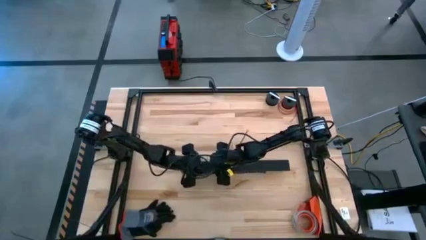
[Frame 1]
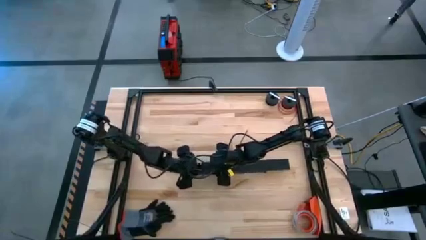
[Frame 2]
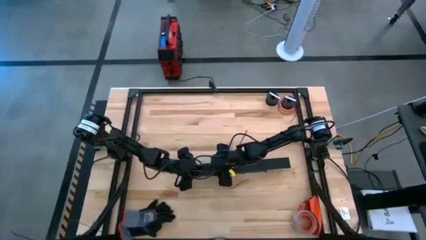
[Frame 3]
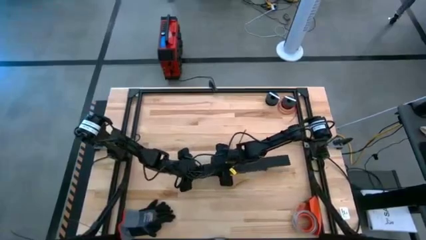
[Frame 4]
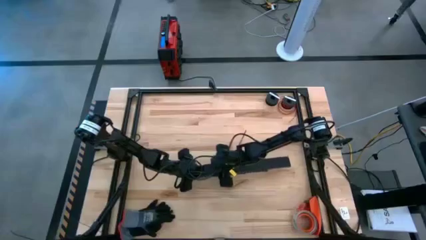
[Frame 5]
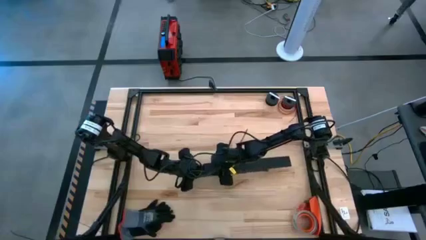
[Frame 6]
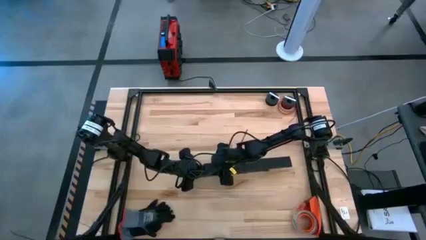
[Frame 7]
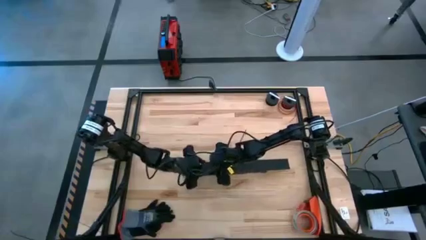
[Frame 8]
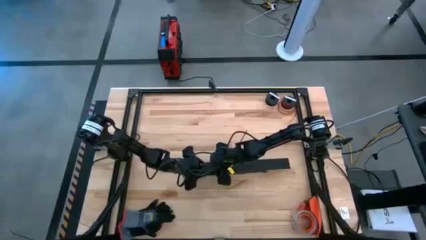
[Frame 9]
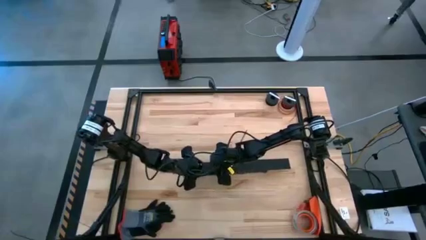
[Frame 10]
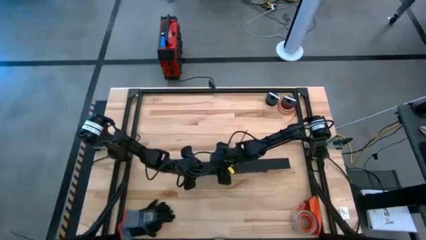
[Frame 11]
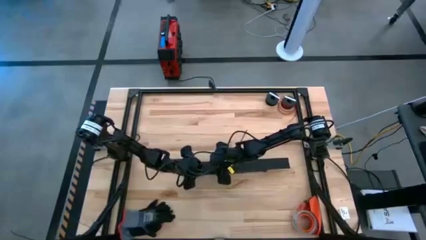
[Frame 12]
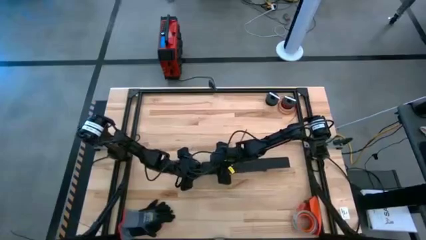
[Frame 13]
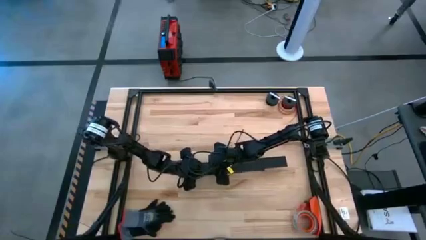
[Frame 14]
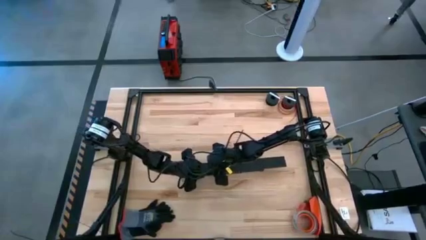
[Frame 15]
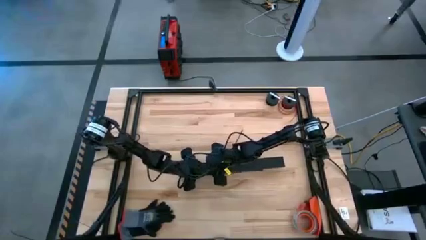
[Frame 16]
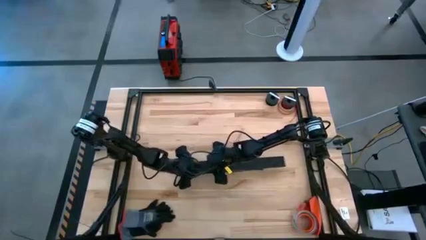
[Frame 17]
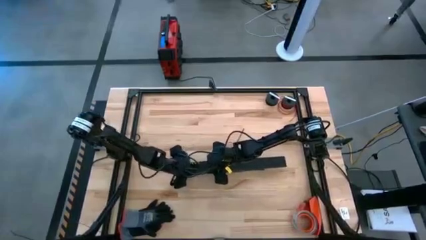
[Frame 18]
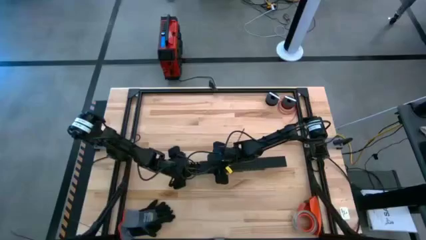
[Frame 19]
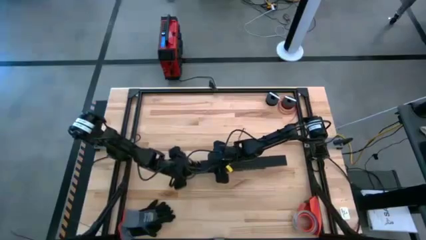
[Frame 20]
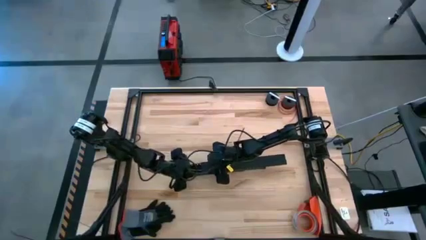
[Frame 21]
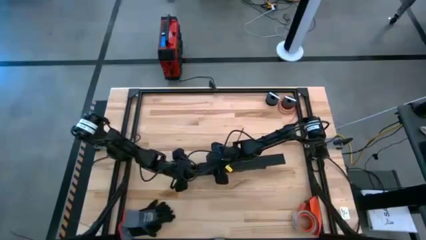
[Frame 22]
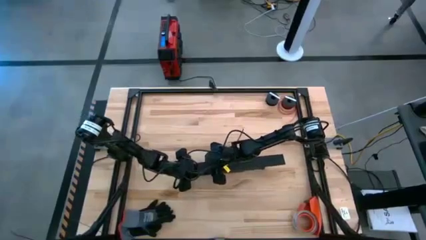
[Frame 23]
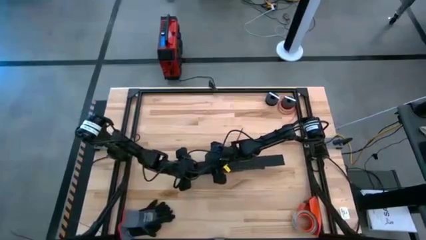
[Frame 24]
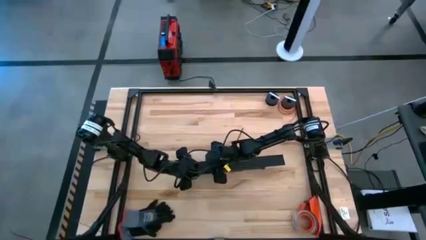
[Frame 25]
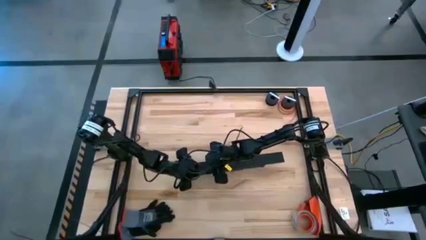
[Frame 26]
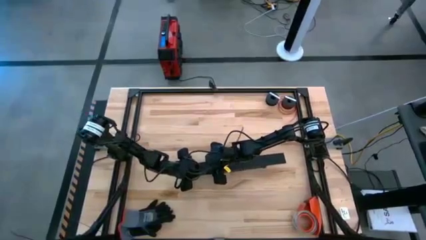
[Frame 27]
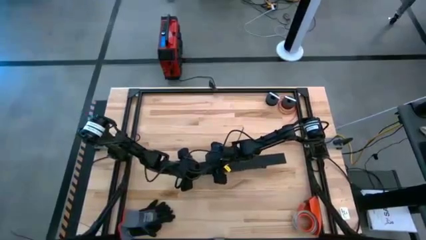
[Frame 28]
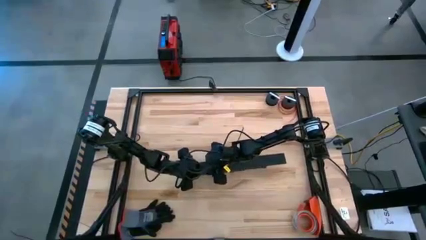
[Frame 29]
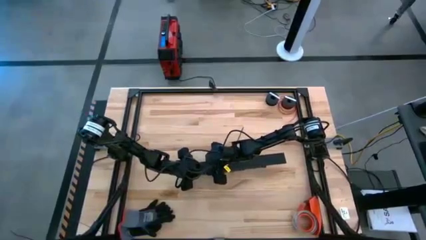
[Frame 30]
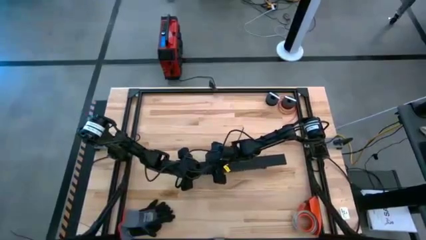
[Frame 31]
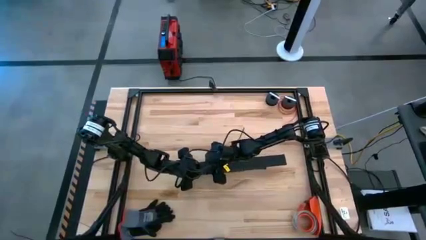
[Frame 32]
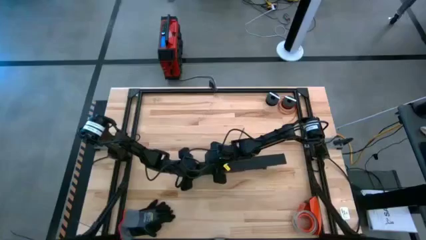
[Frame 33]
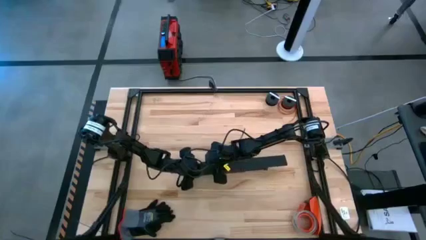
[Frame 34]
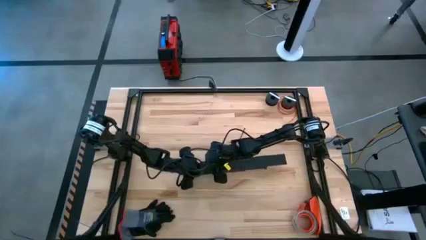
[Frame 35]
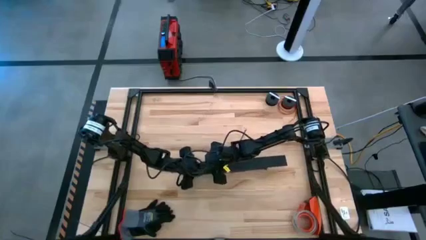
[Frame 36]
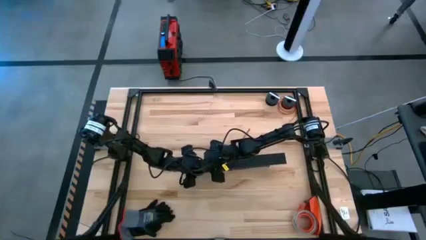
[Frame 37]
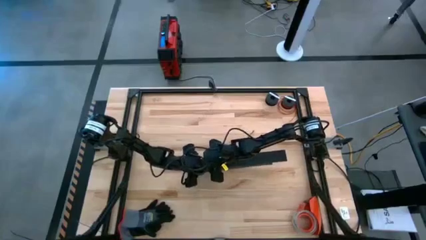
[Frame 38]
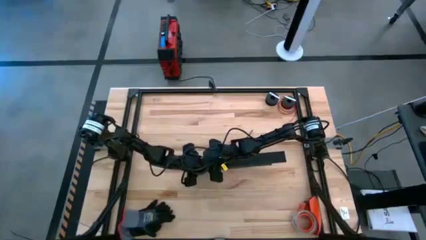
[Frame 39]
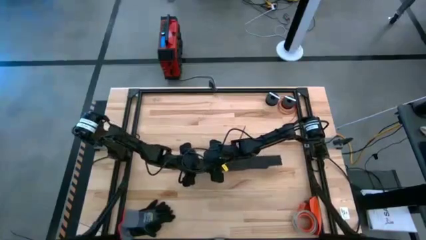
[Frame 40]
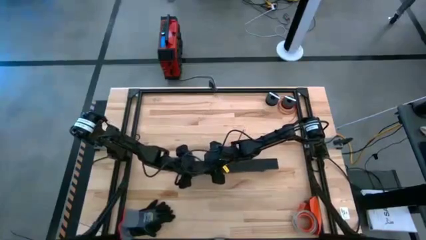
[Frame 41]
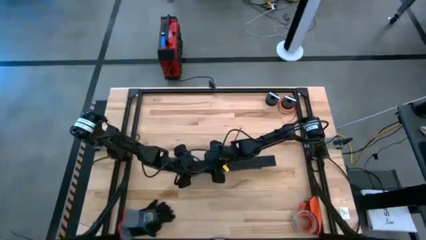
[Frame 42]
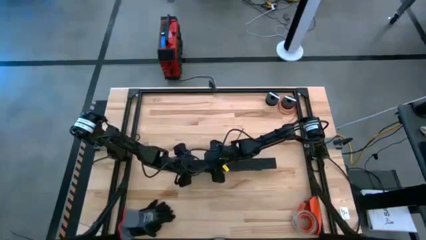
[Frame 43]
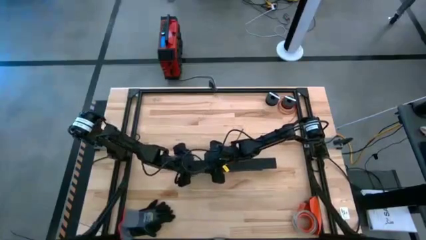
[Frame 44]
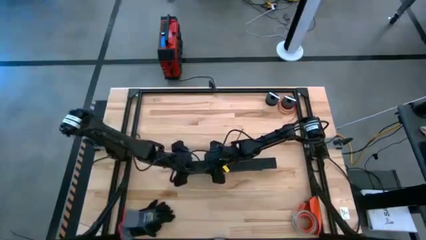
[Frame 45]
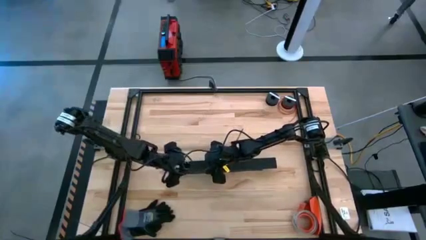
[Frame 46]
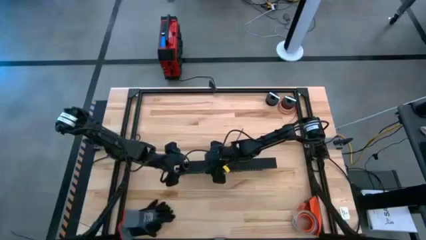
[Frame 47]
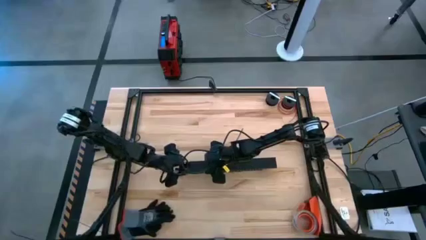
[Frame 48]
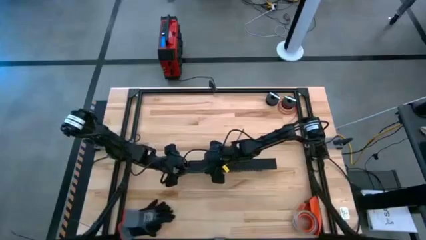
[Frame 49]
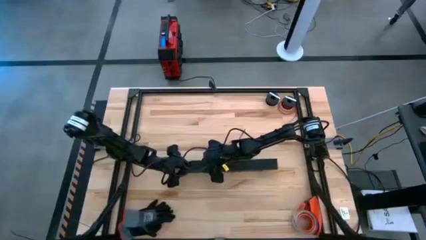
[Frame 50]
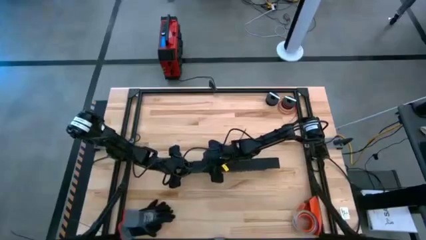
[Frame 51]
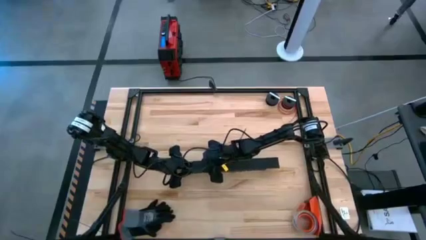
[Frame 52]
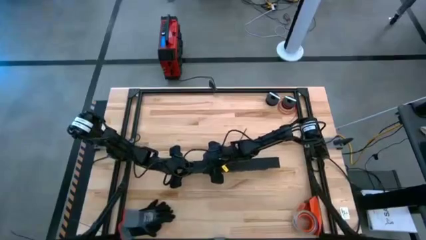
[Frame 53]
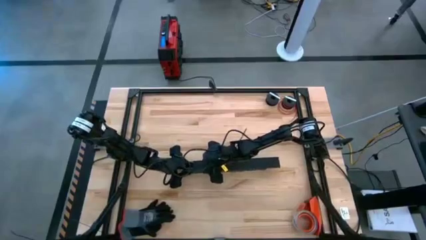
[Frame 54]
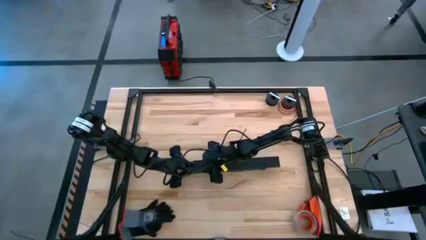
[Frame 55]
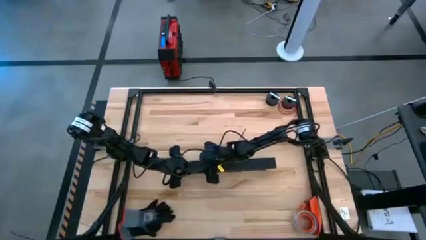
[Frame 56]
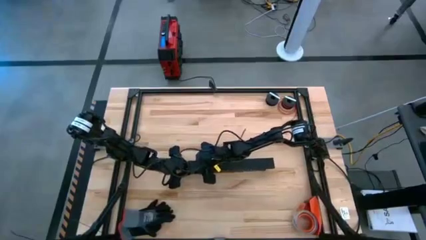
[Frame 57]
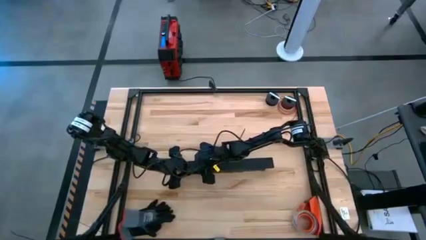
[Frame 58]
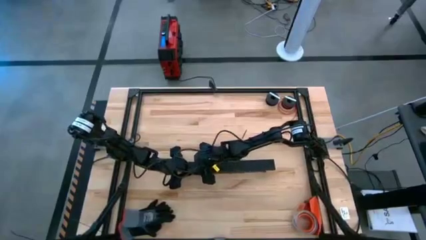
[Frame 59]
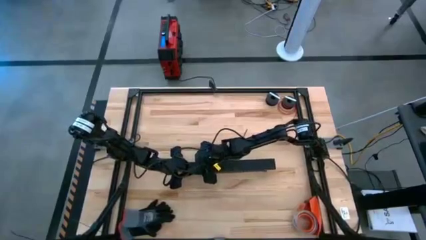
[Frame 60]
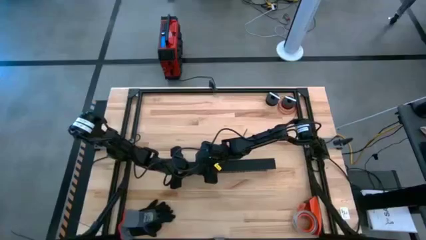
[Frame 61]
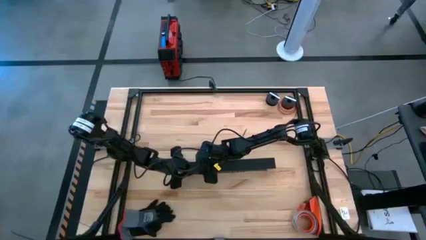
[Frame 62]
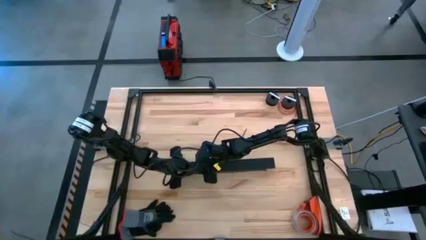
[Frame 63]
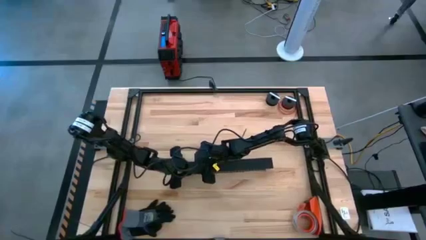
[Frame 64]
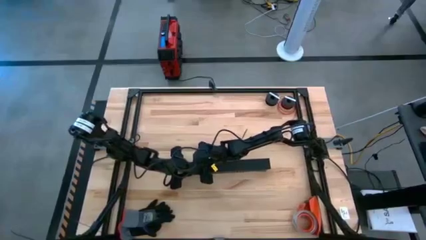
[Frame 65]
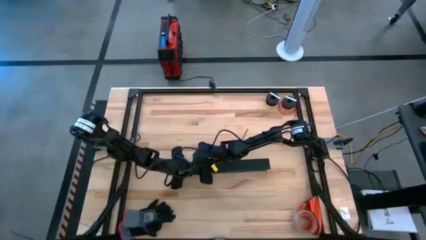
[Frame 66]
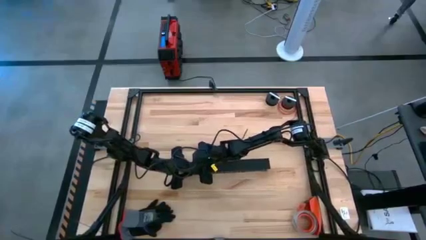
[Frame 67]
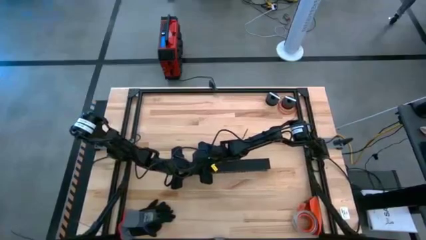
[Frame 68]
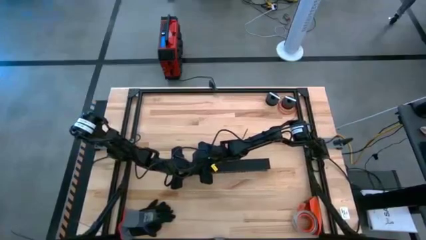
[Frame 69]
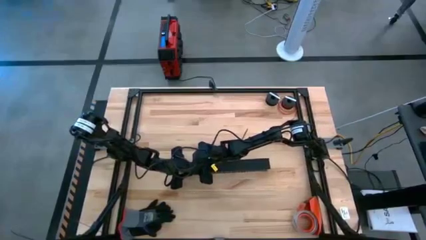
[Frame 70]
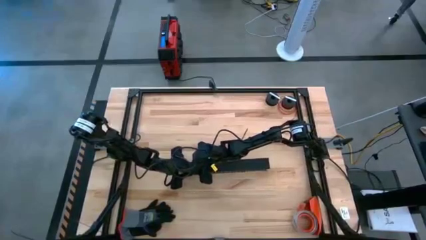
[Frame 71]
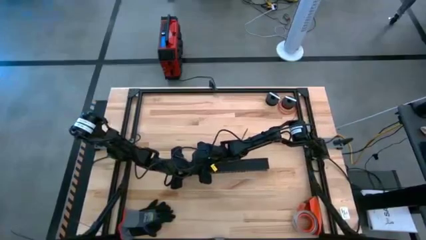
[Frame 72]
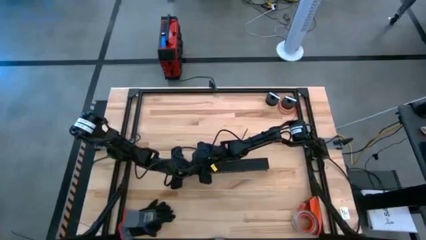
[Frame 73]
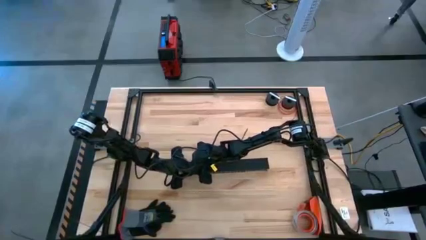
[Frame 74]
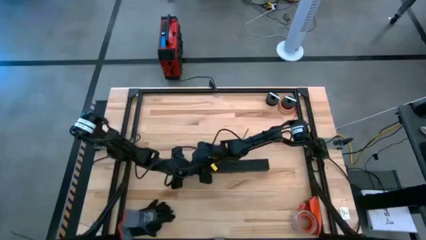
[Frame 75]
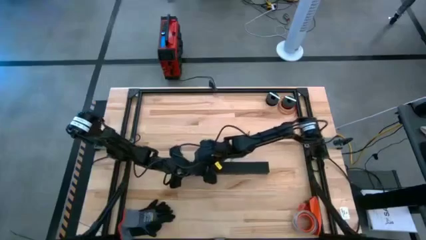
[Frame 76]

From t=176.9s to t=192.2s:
Task: Ziptie cables
Insert the cable duct cover into the cable duct

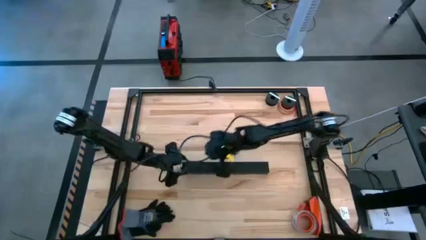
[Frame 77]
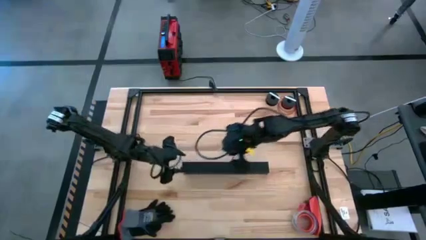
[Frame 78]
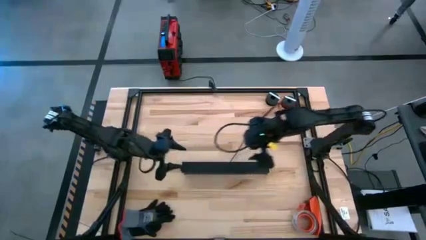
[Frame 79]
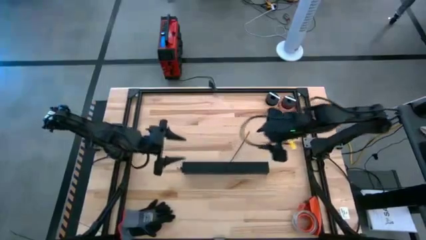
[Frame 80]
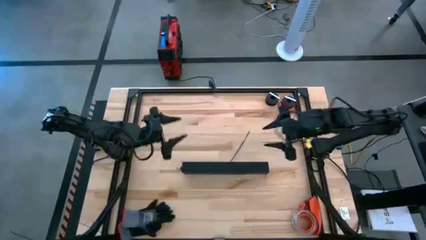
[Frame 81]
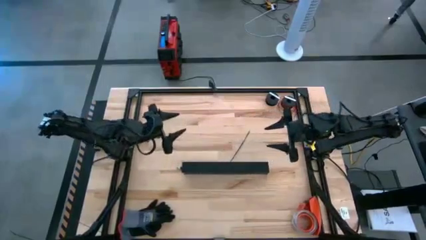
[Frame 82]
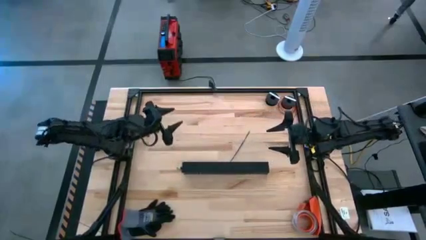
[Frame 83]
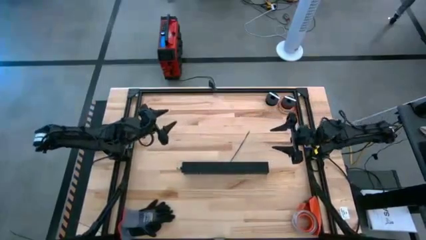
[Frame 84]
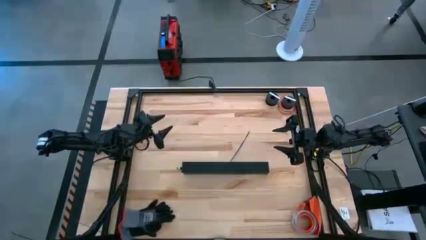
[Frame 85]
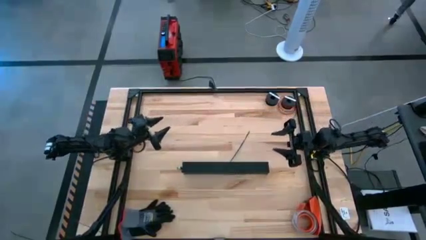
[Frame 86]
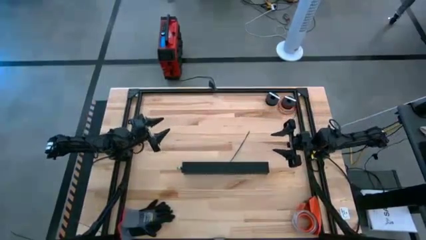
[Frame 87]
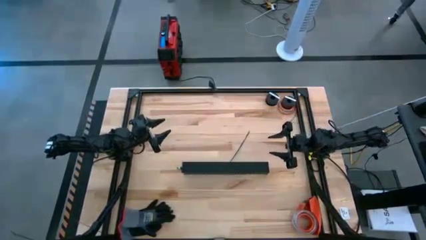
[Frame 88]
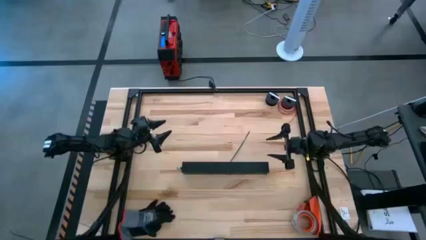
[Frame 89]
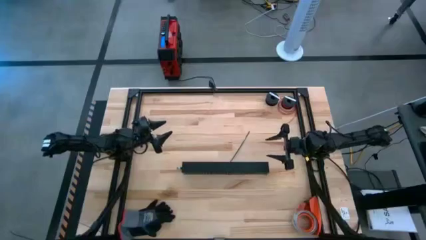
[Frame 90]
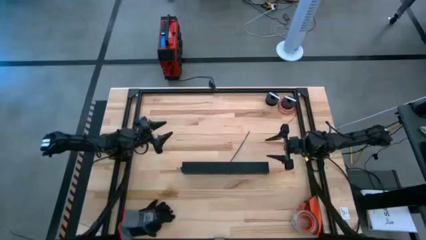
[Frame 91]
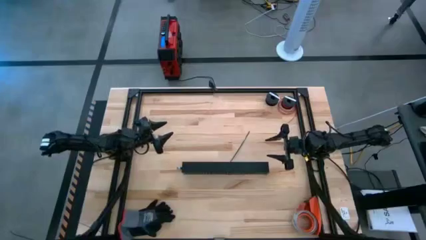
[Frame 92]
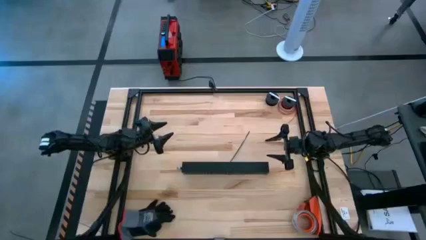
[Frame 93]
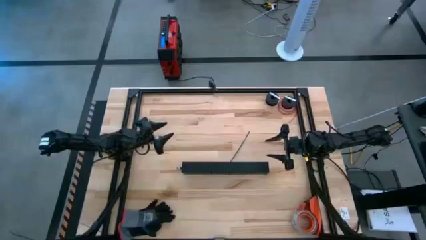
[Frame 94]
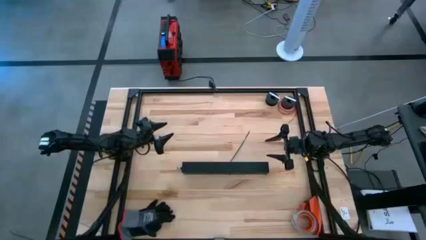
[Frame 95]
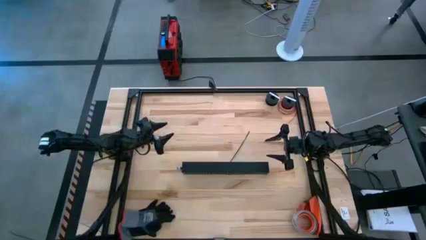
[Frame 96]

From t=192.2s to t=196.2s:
Return to Home Position
